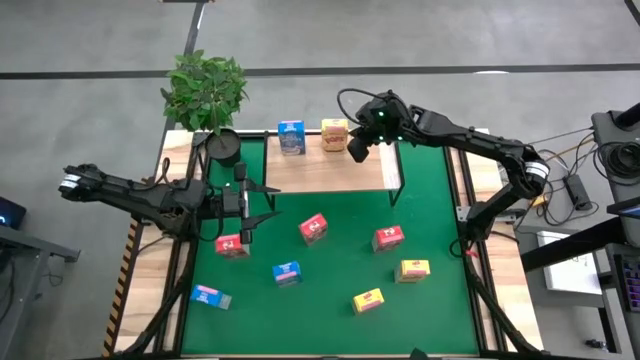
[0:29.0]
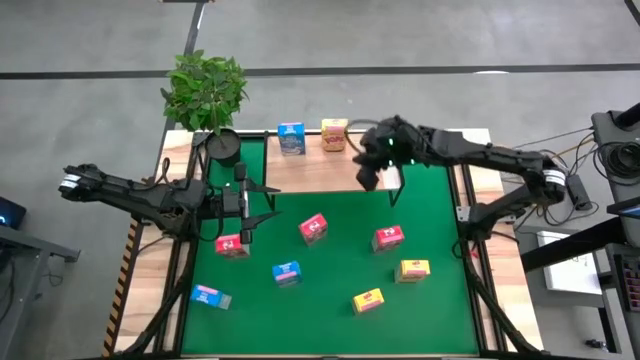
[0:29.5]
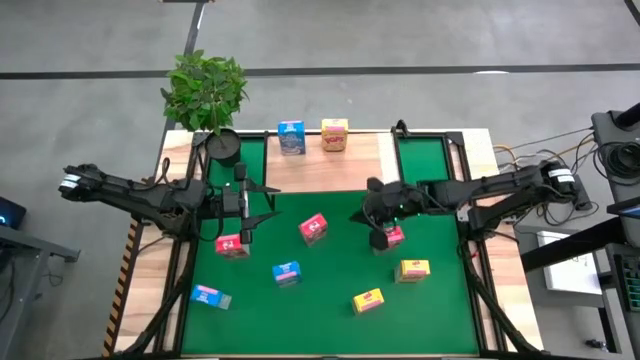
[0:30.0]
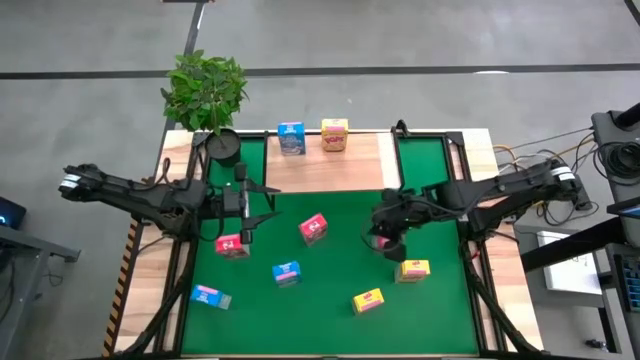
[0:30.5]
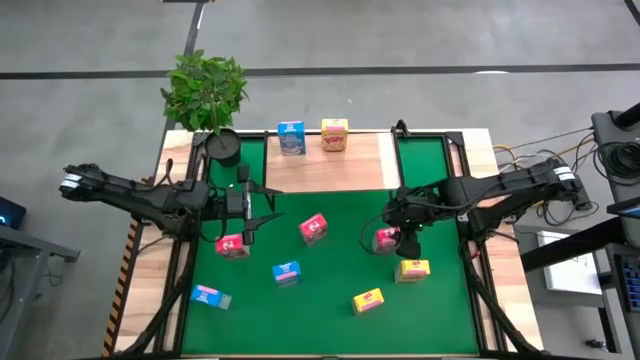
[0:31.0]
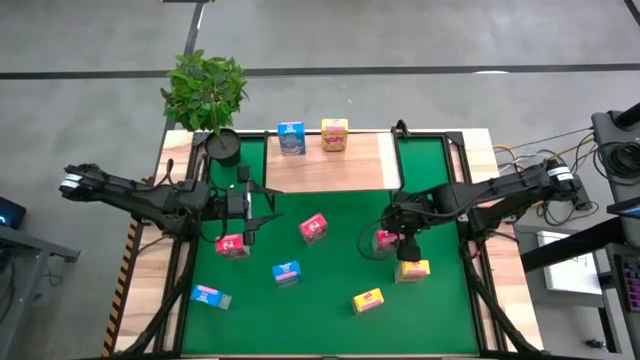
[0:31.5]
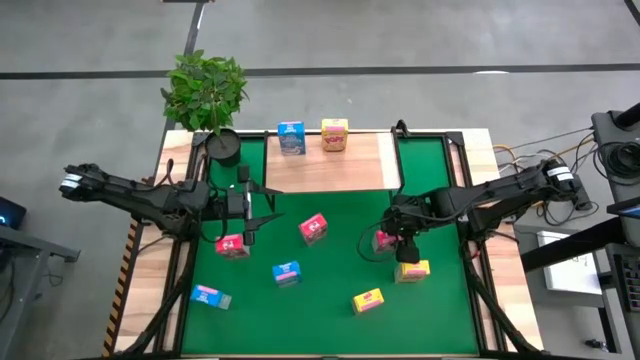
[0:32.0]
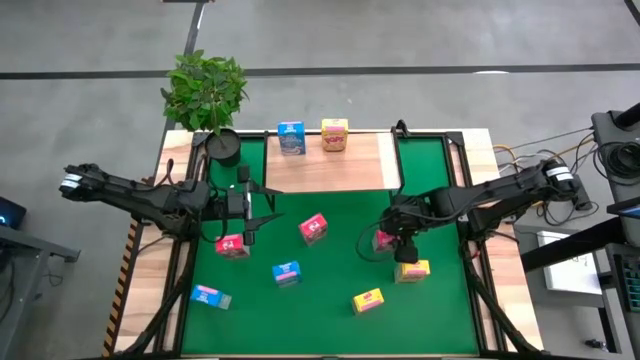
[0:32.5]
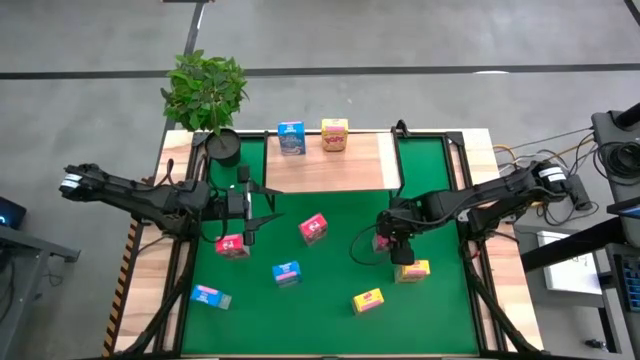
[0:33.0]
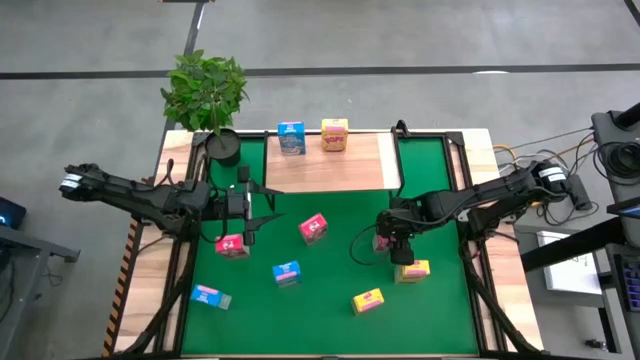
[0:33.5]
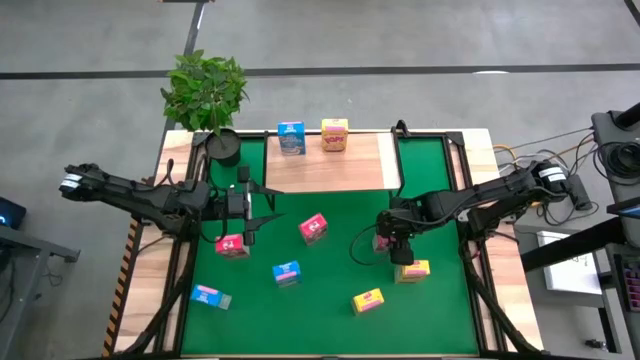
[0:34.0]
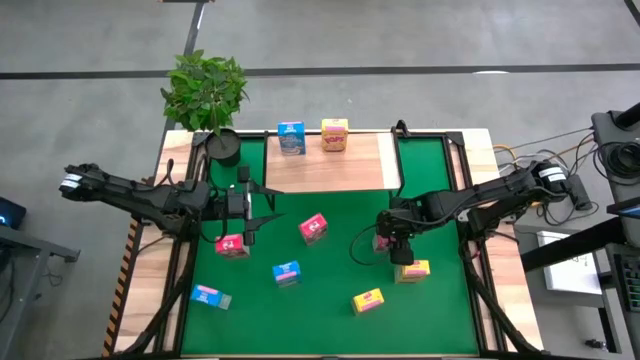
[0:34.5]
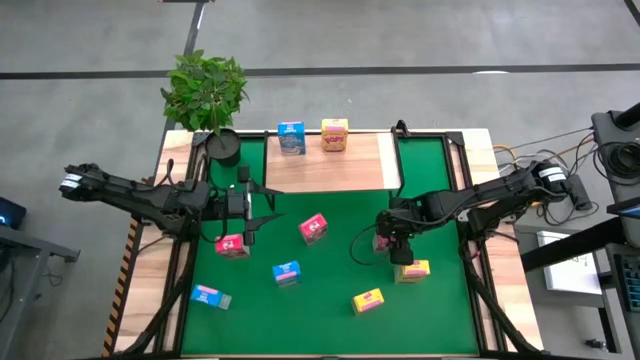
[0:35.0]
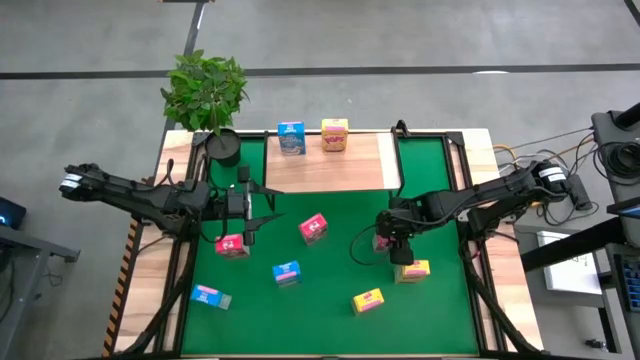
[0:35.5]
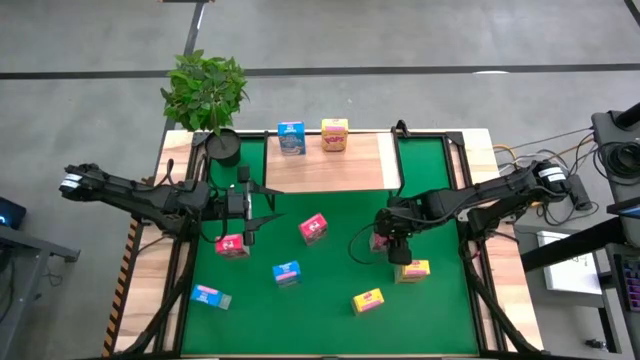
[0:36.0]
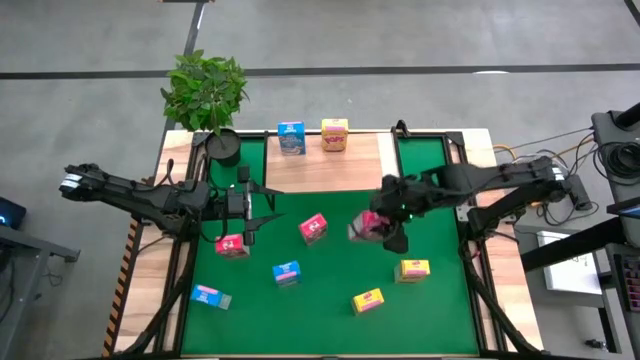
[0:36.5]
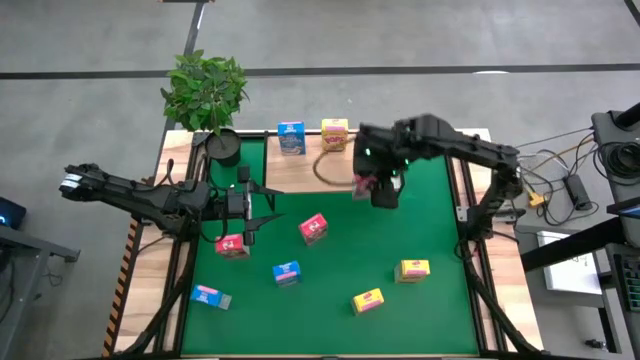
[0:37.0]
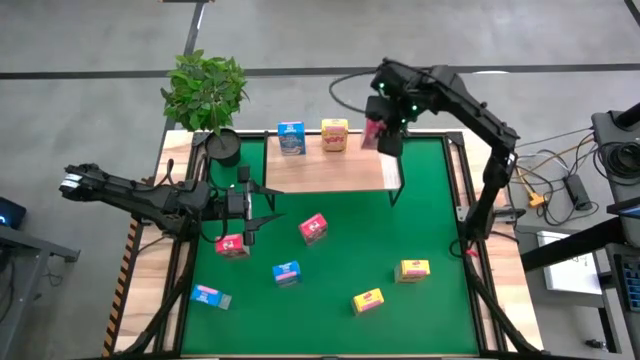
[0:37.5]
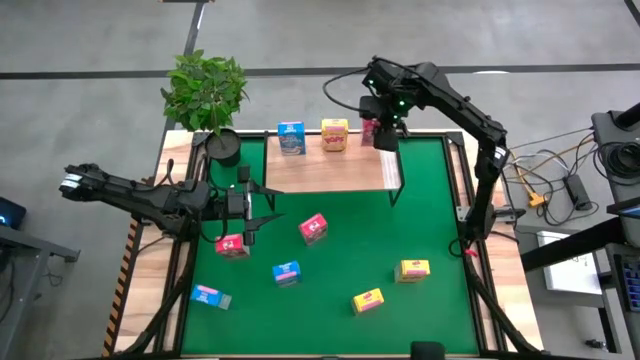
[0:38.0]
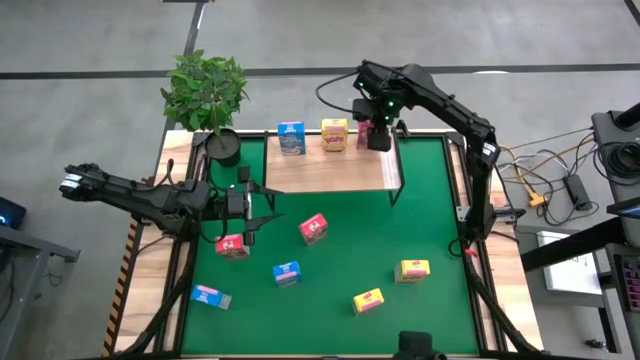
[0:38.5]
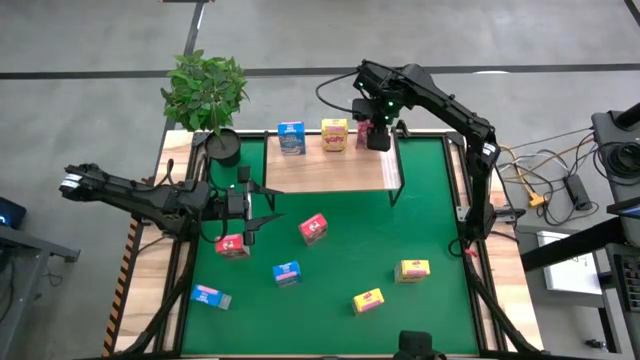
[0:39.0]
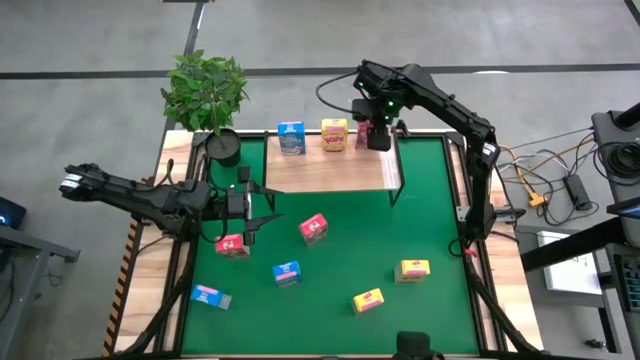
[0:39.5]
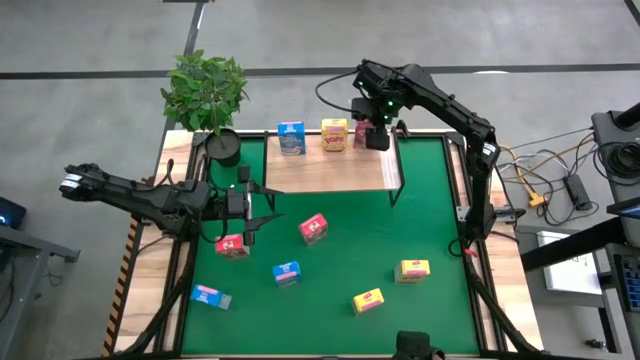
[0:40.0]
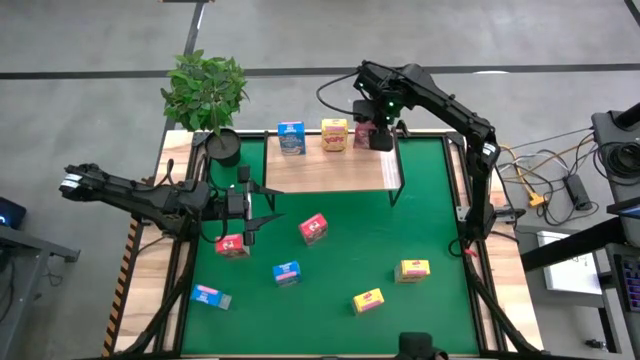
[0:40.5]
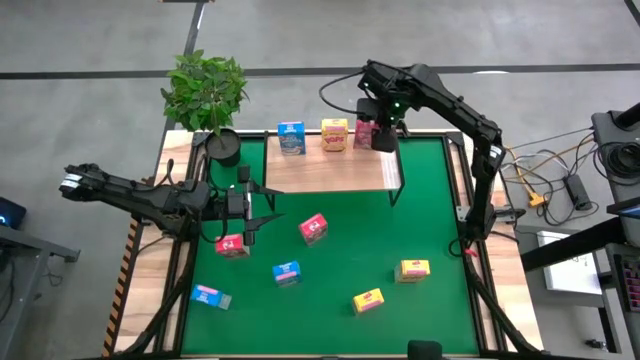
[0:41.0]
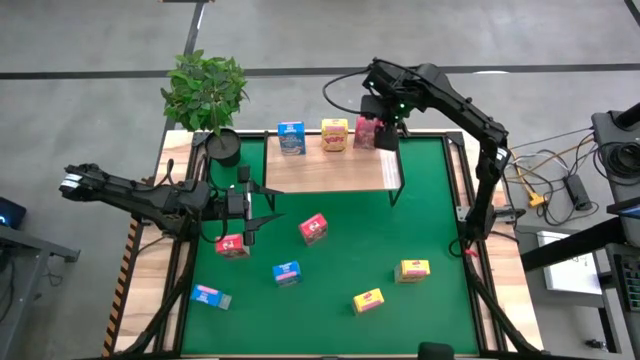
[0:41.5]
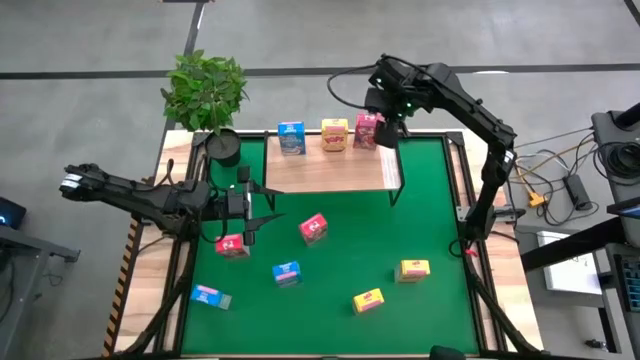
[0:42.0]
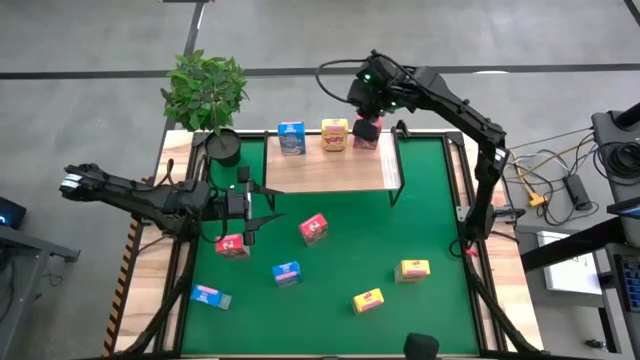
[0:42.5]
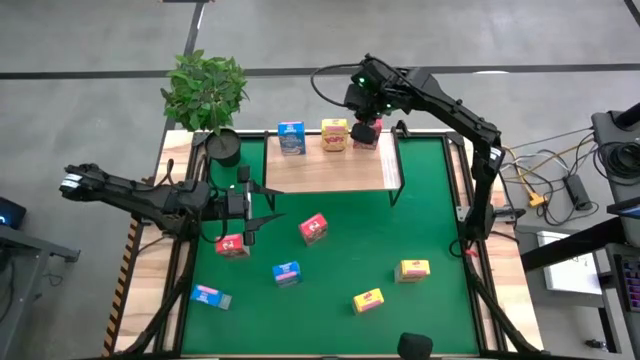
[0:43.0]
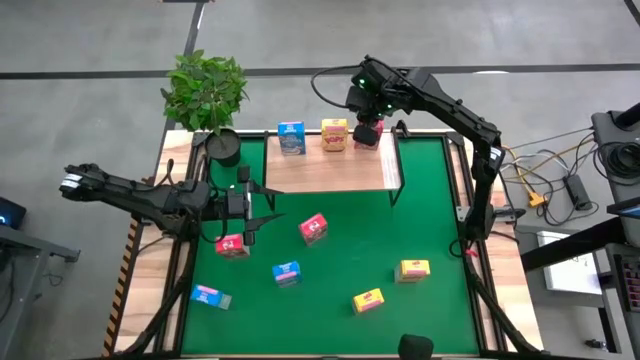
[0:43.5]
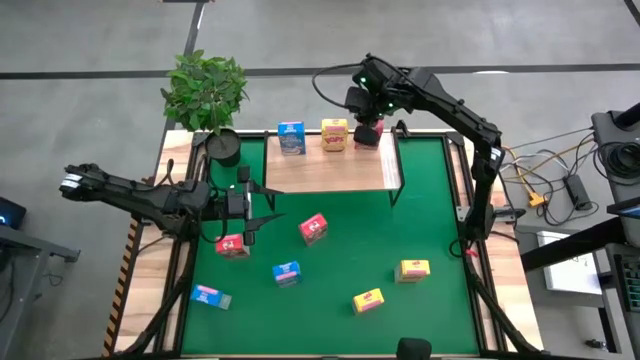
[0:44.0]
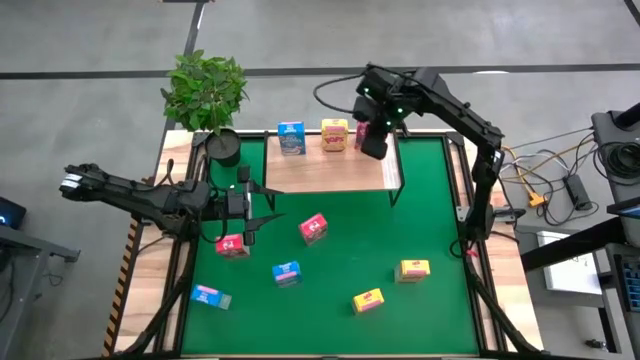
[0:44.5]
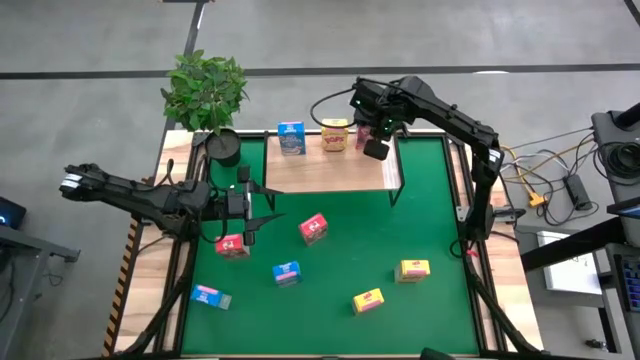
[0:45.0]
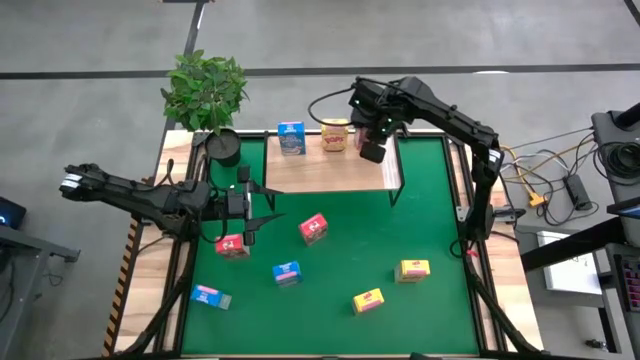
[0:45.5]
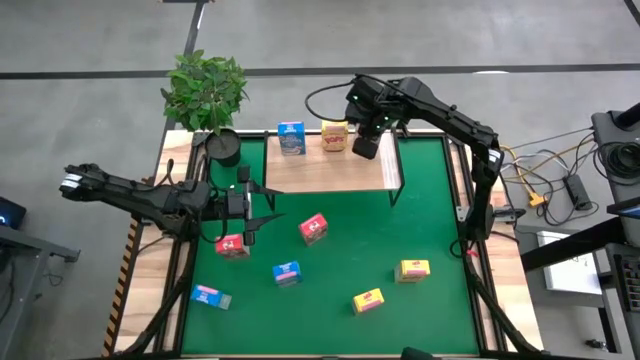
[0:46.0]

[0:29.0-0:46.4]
Task: Stack cereal on shelf
Put the right red cereal box on the shelf

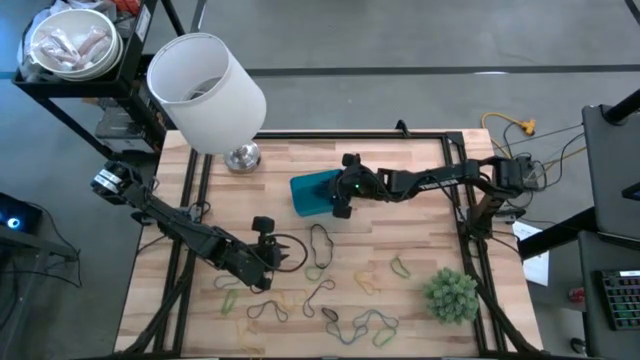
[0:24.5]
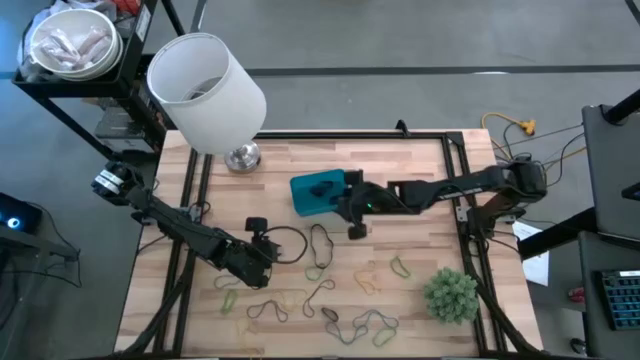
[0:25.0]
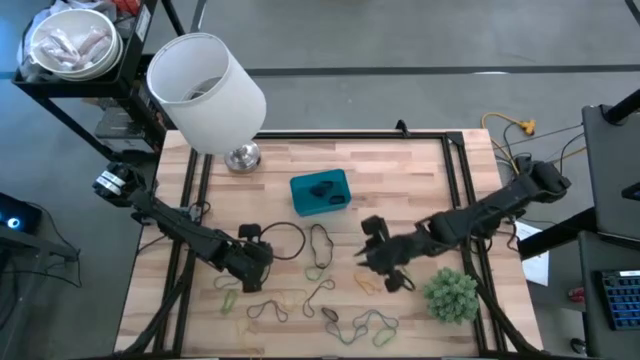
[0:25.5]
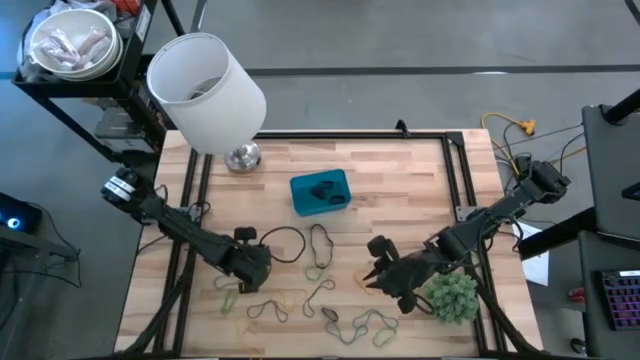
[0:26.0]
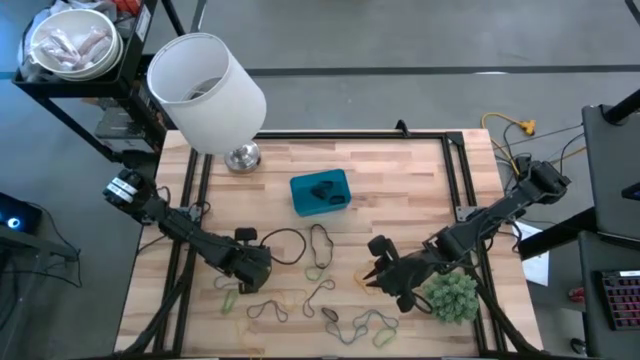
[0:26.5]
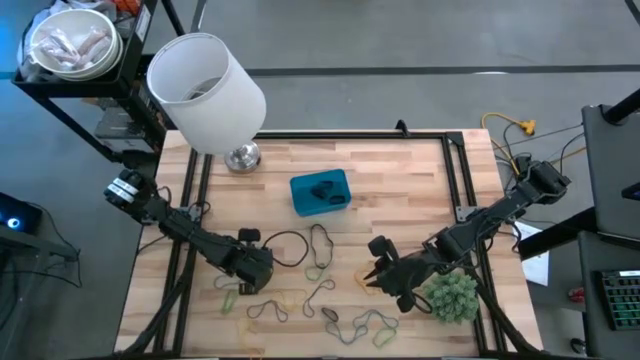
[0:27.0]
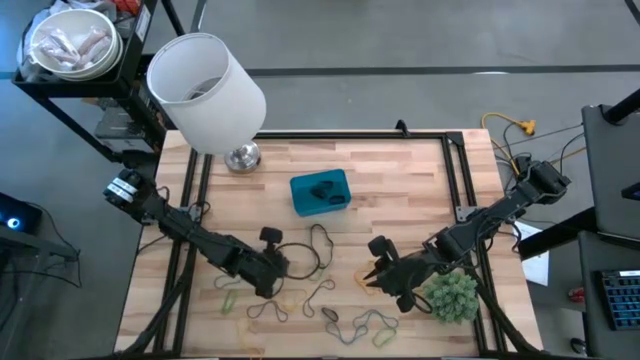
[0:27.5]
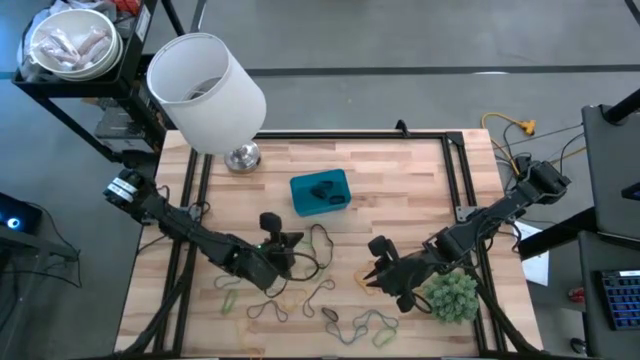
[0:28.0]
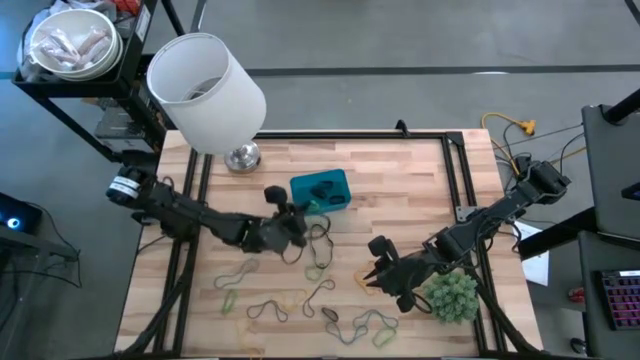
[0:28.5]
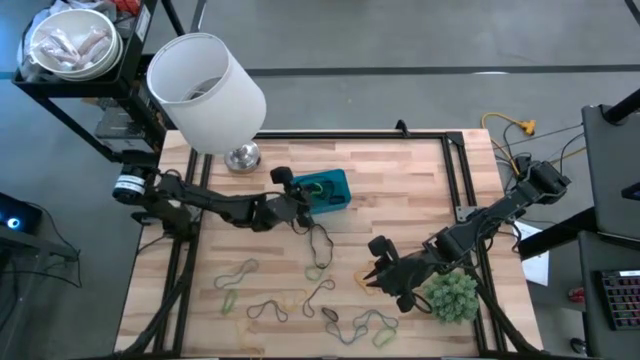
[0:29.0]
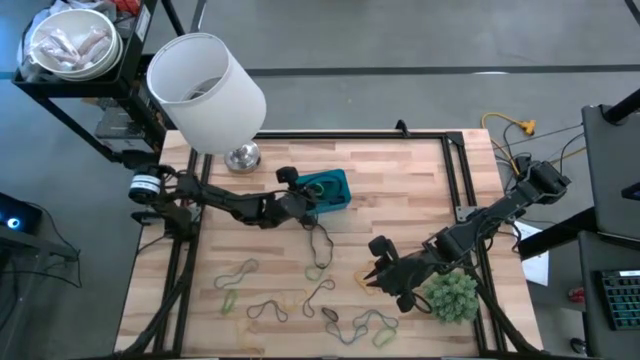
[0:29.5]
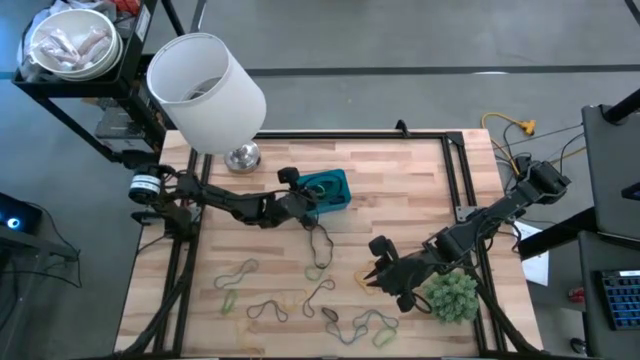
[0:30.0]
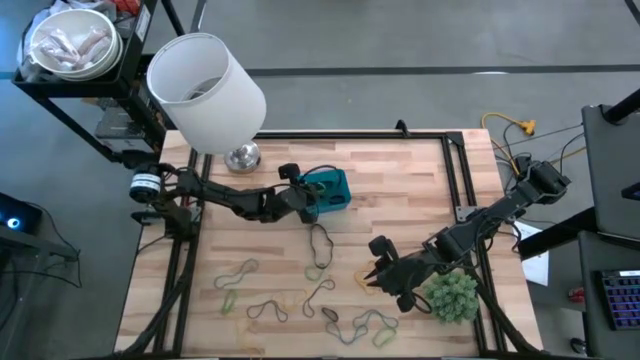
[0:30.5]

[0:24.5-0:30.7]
Task: Pick and place rubber bands into bin
Put the green rubber band into the blue bin
